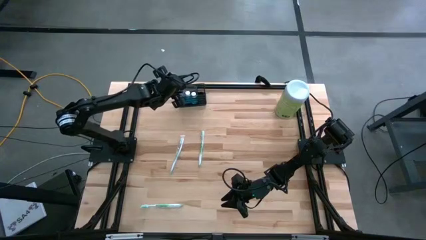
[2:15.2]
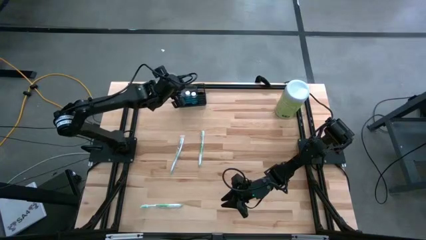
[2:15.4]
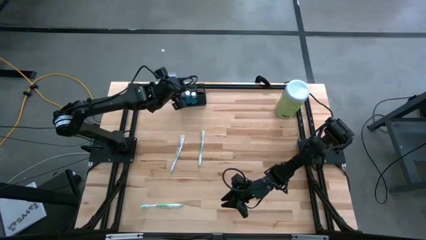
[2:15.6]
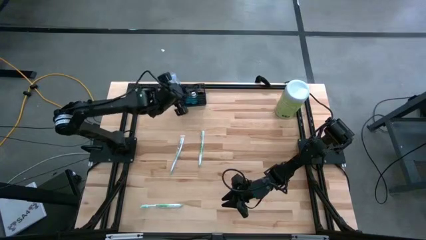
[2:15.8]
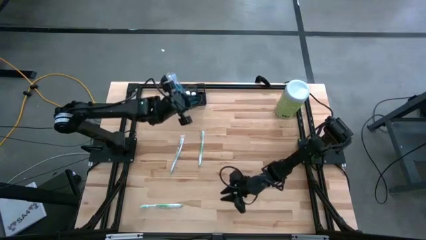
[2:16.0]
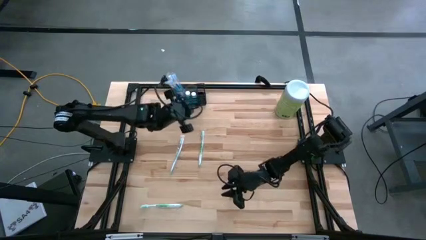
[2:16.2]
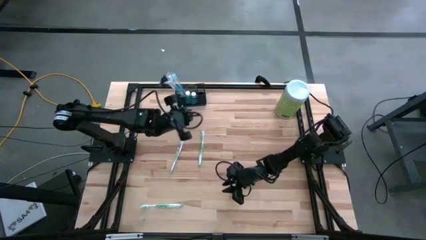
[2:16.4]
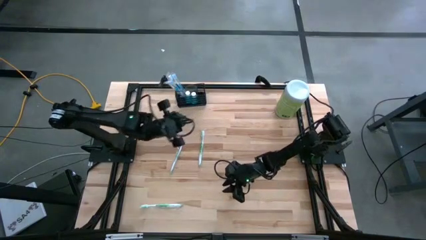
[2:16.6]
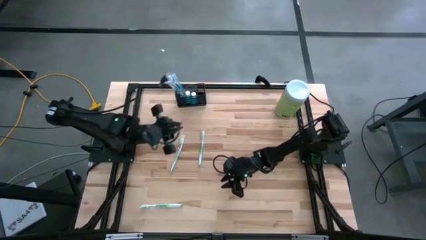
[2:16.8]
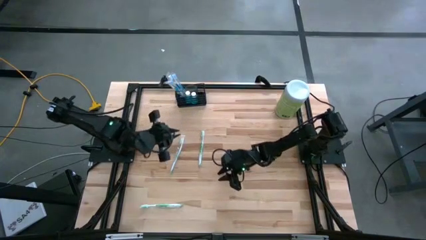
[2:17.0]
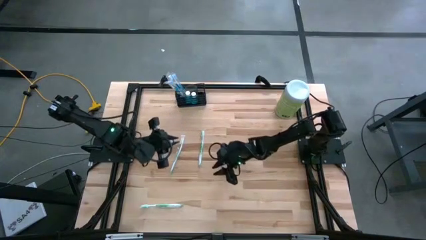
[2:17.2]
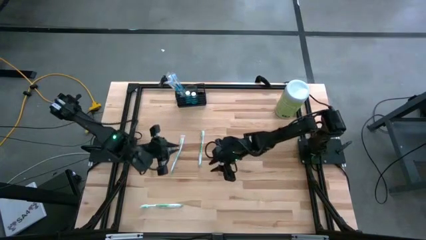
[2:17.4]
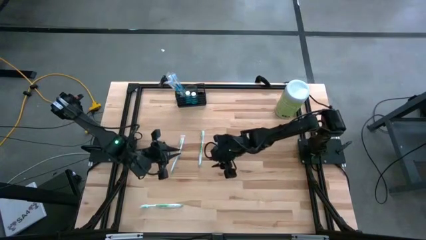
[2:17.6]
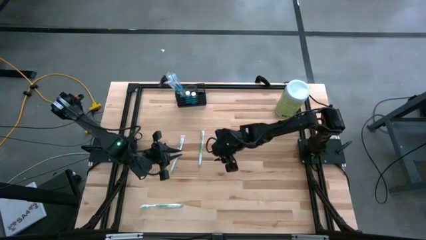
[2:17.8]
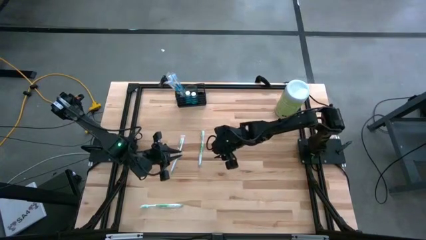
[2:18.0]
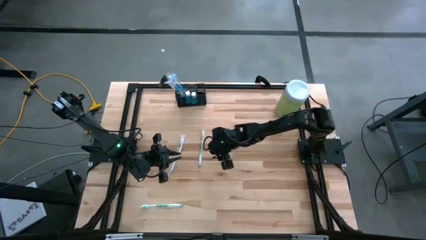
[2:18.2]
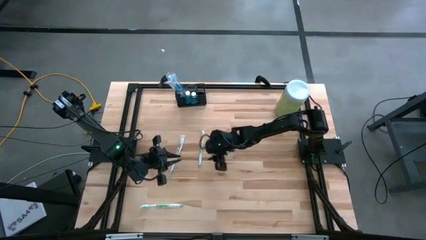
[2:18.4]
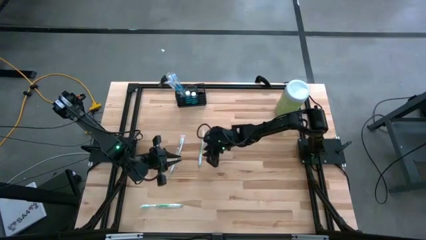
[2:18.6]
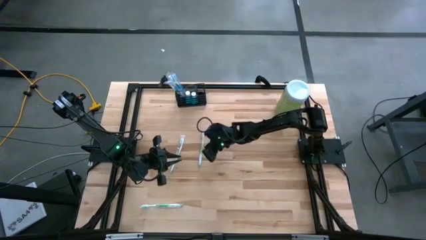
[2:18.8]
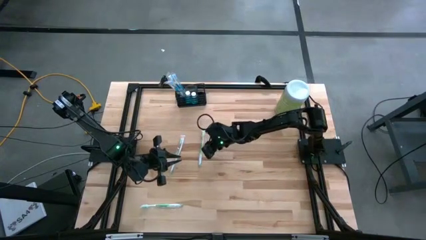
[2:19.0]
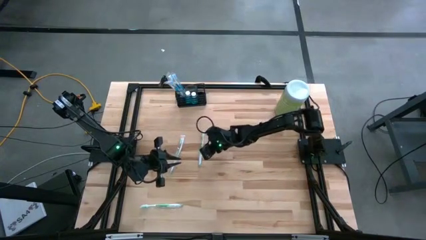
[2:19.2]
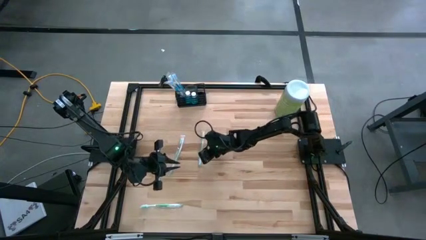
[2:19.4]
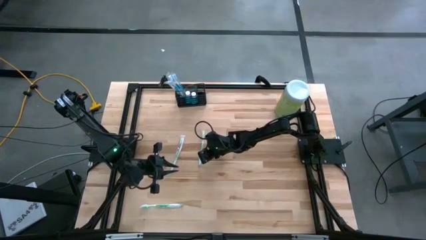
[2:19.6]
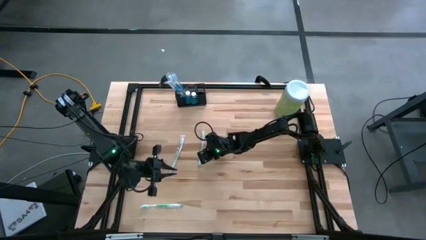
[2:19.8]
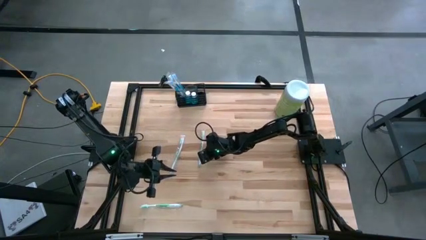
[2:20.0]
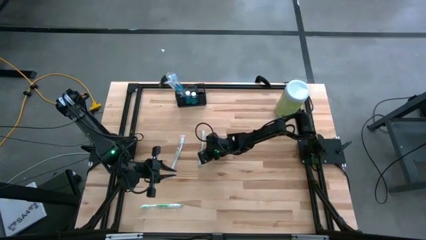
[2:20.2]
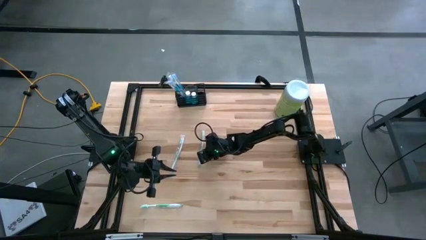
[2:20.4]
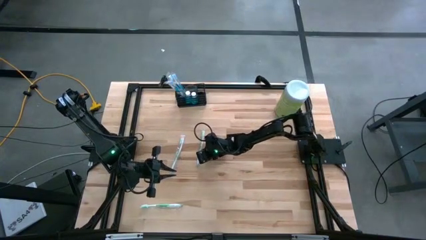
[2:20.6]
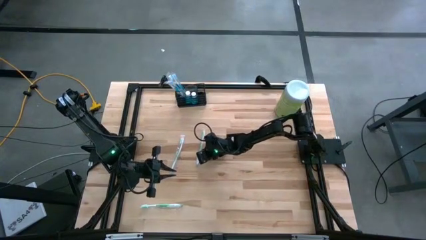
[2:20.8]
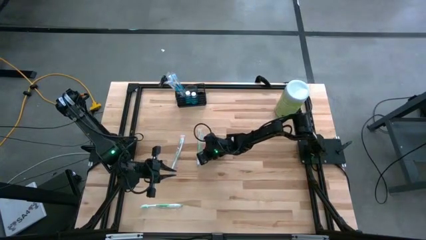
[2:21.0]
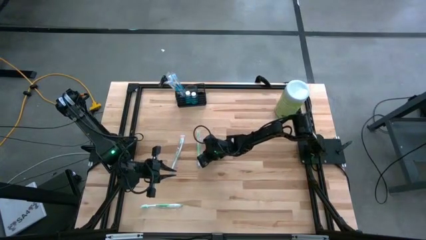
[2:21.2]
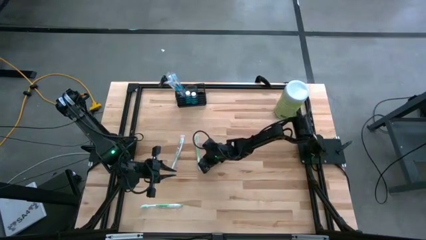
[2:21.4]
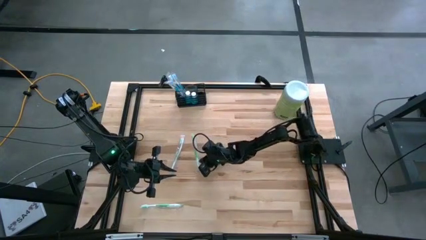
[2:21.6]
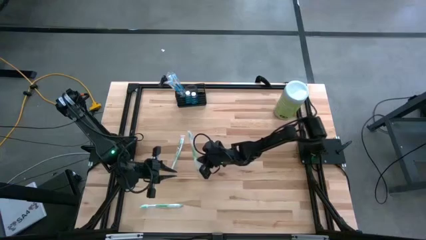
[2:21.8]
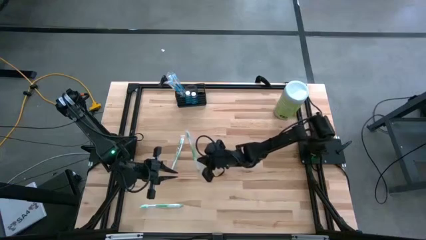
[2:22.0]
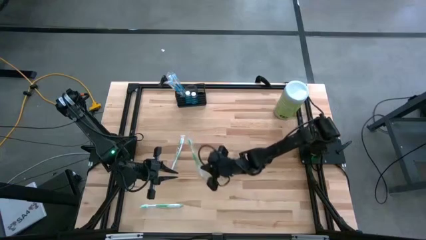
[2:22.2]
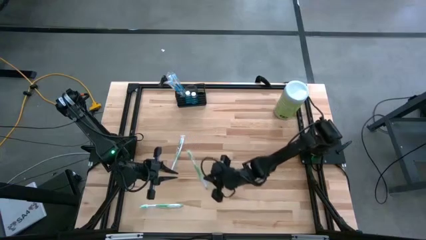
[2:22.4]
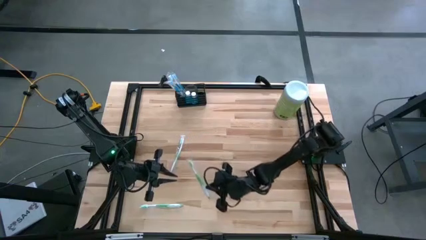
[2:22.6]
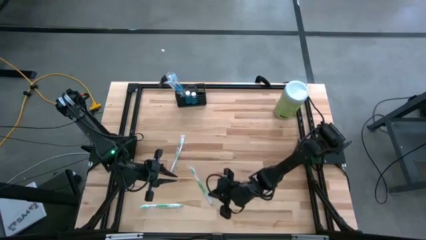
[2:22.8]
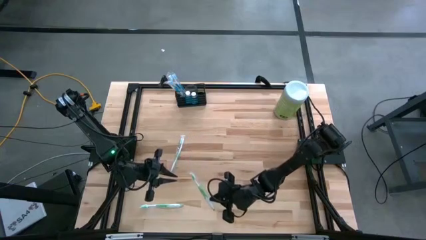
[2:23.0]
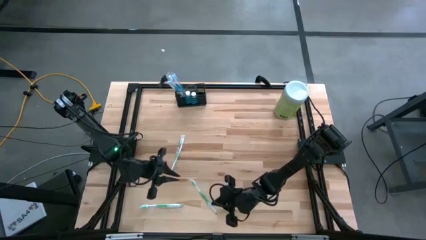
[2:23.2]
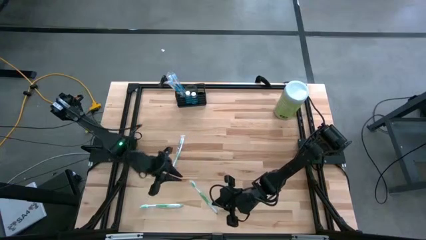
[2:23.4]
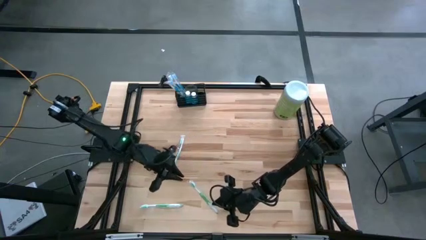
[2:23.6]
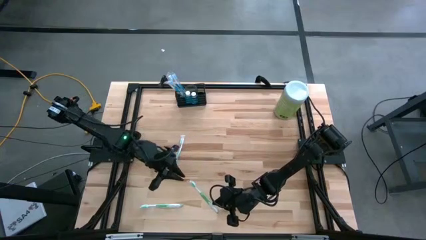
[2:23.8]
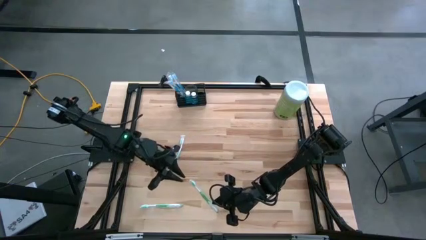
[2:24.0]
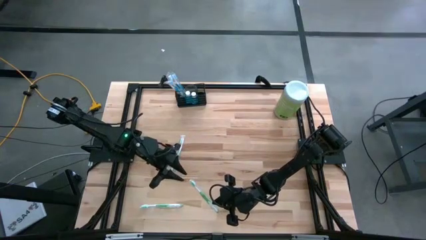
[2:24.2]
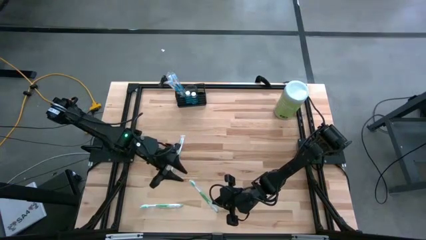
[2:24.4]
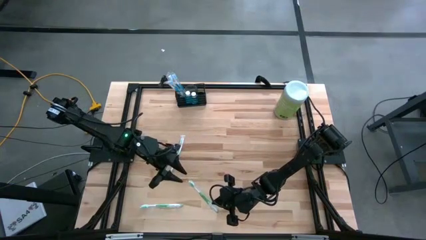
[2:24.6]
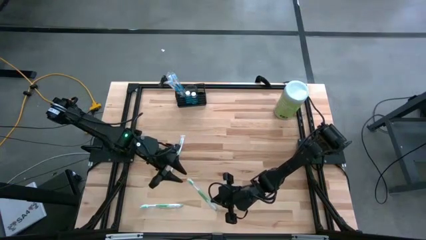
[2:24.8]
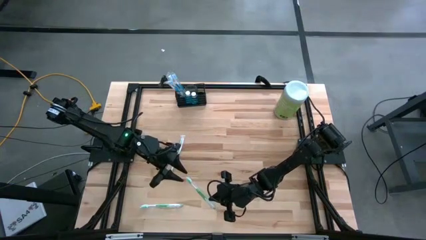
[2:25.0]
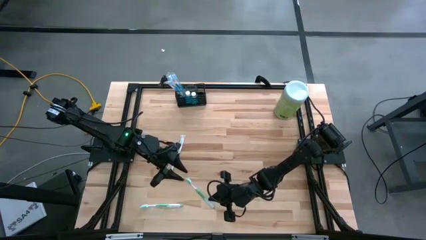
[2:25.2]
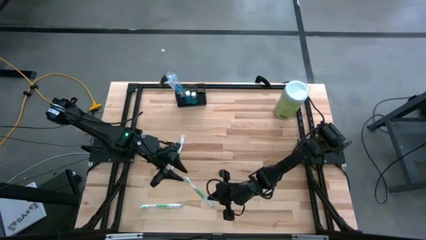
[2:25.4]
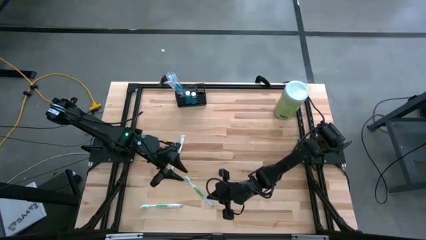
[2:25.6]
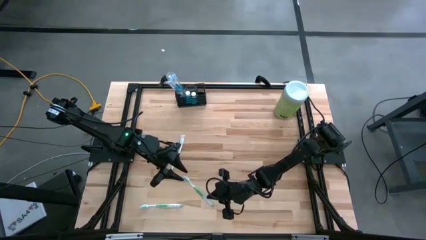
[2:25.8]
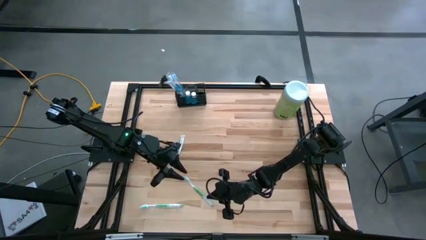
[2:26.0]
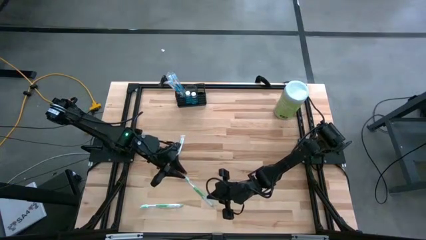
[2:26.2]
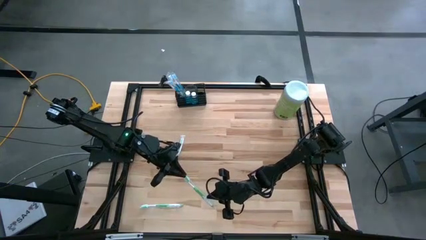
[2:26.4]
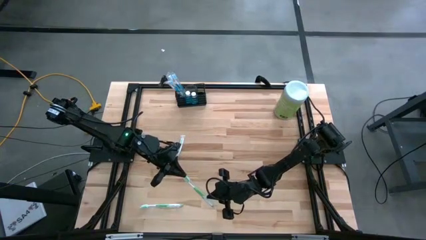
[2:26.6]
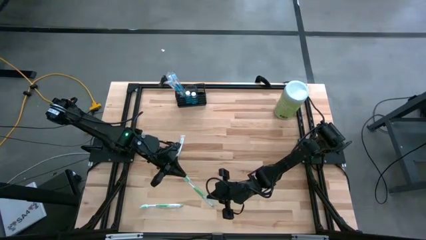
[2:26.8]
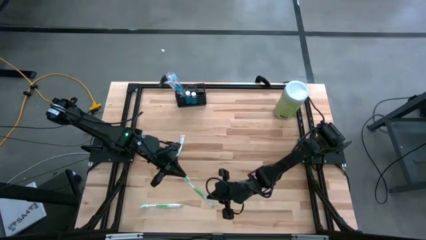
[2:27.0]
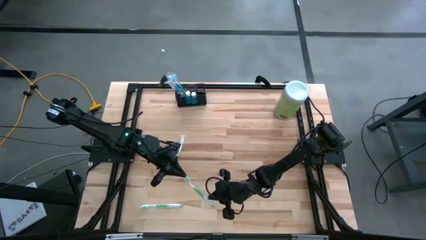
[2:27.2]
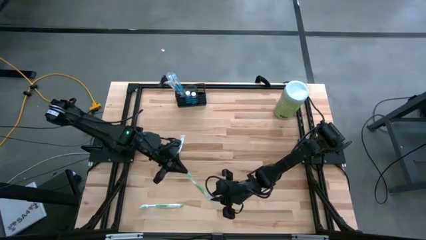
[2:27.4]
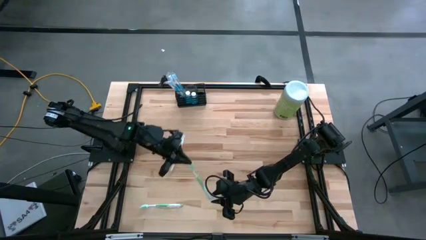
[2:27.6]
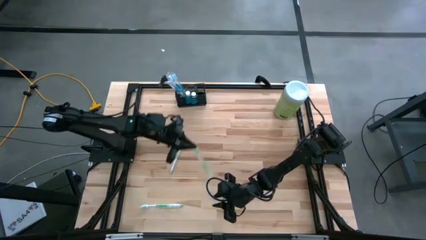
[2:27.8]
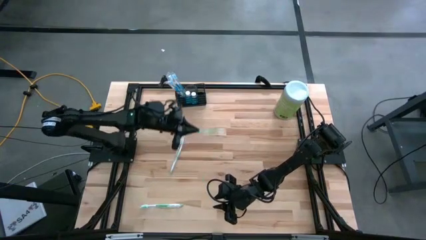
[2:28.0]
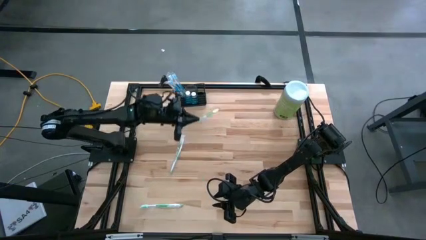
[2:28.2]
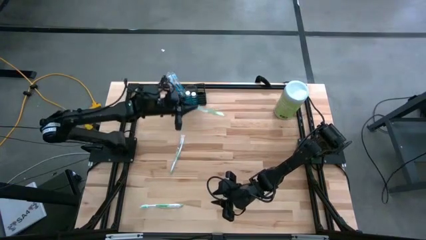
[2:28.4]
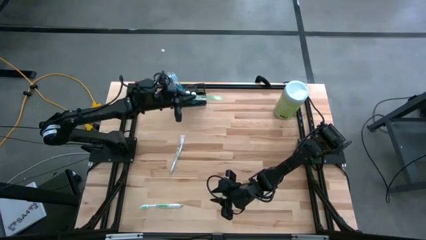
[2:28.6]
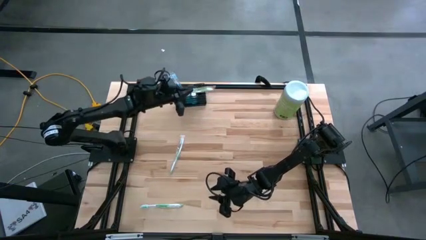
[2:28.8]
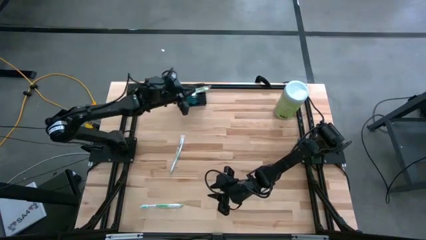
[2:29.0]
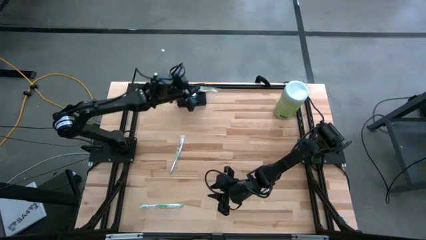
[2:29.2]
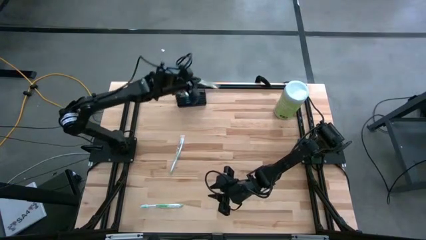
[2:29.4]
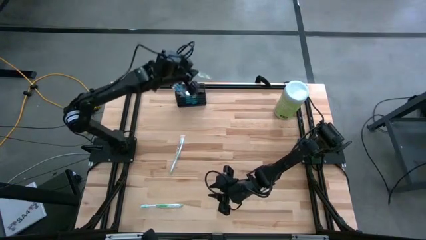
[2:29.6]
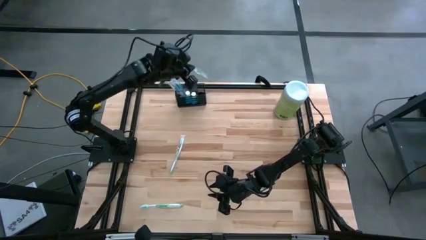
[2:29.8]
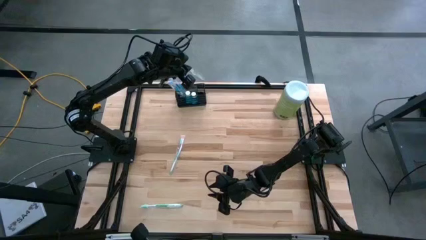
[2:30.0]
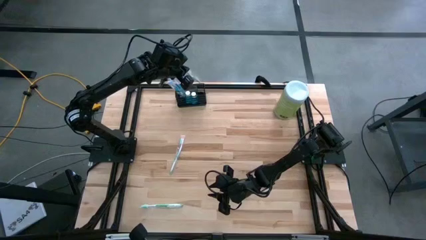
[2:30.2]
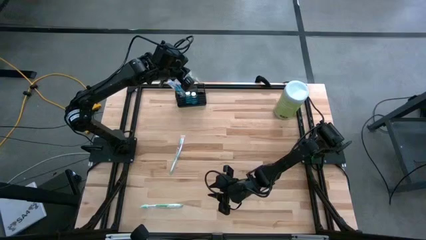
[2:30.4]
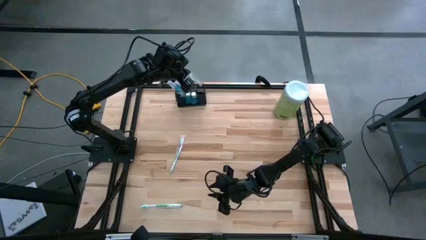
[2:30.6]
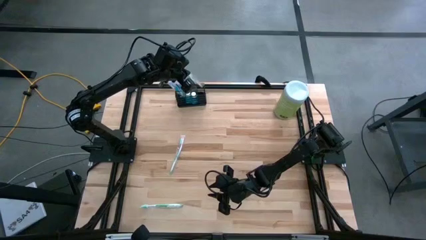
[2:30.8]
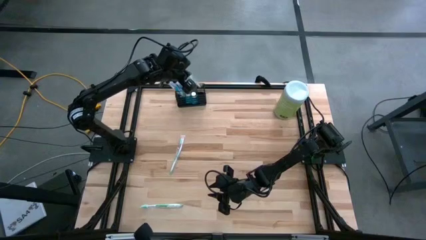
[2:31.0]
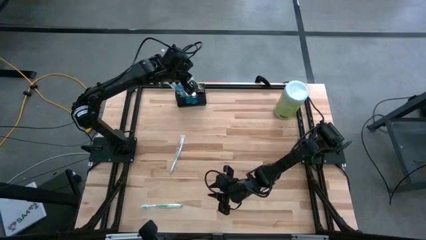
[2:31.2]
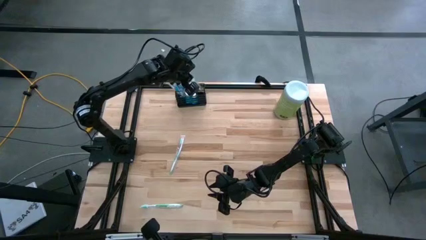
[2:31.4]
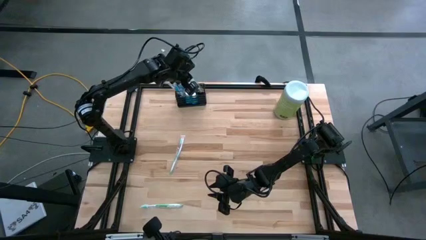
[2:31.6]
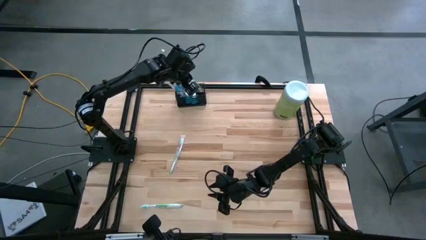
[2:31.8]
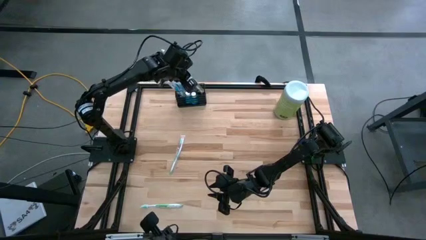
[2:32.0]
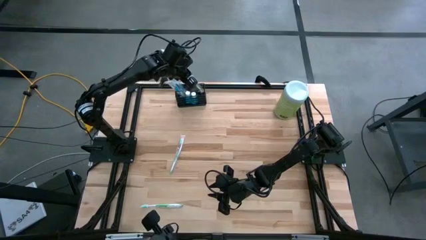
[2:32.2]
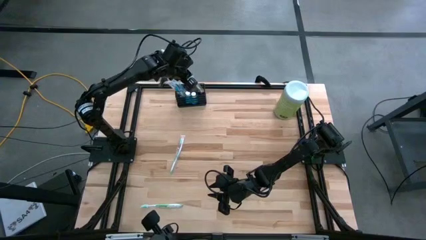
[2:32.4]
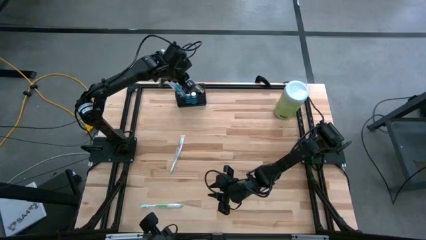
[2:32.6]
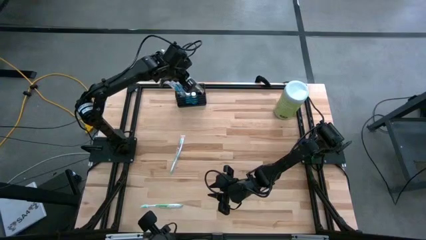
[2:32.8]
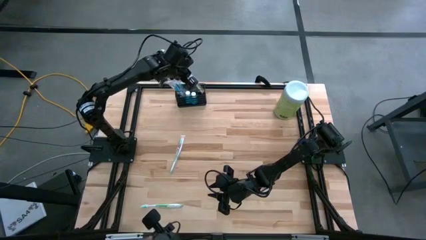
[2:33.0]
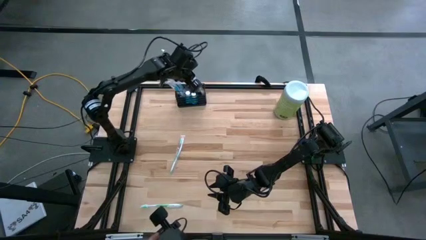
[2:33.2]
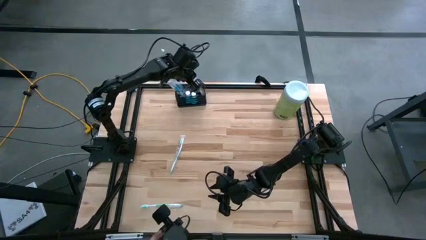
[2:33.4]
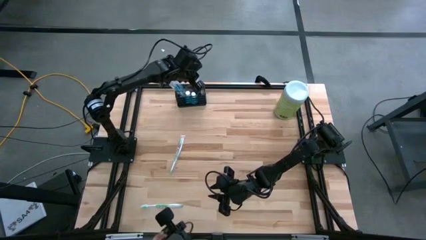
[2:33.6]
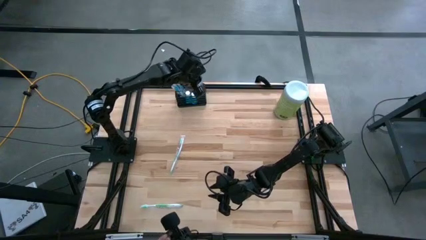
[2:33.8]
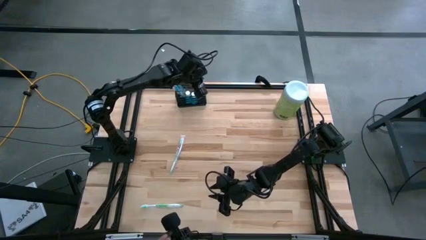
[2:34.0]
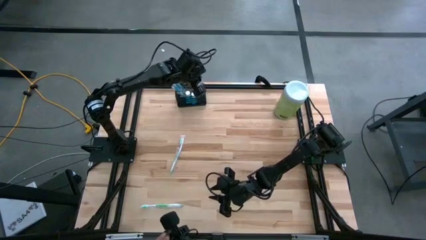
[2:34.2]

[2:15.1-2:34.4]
Task: Pick & Place toothbrushing station
Put the top right green toothbrush into the organizer
